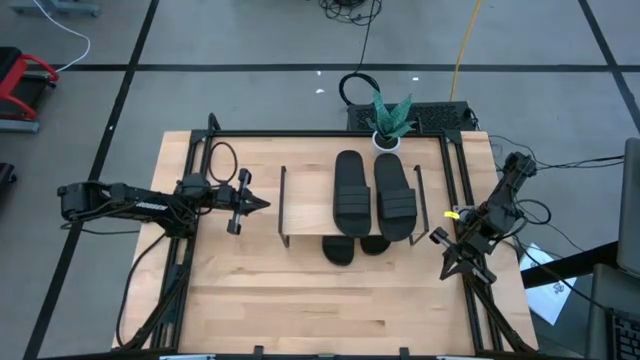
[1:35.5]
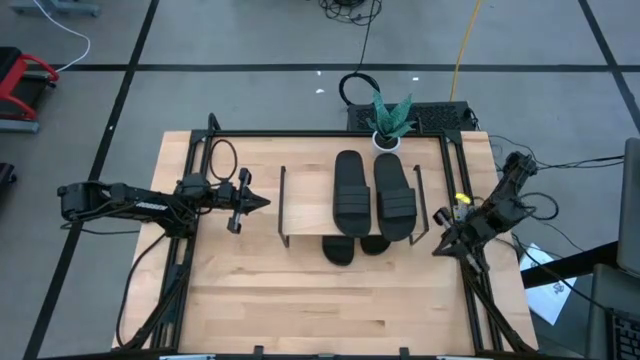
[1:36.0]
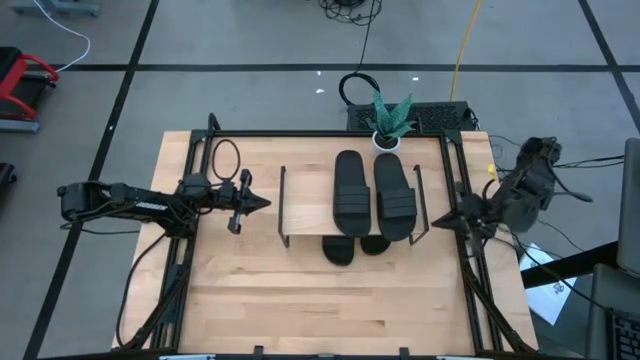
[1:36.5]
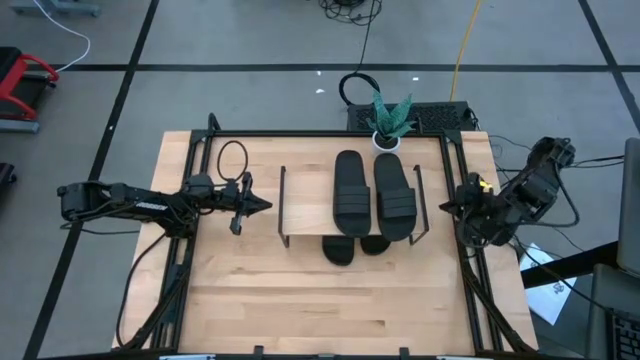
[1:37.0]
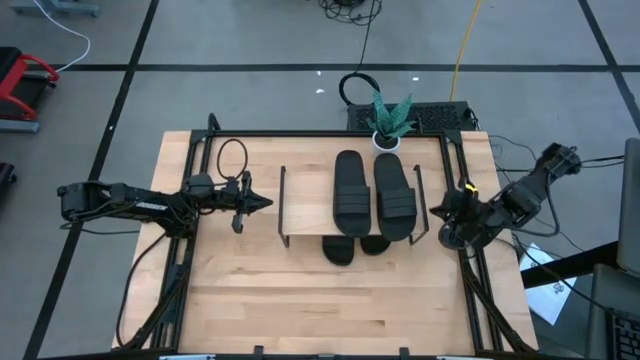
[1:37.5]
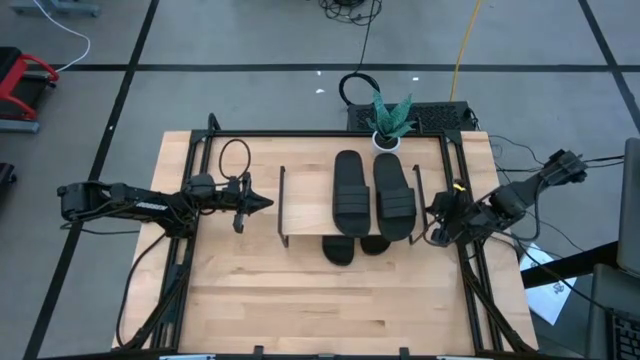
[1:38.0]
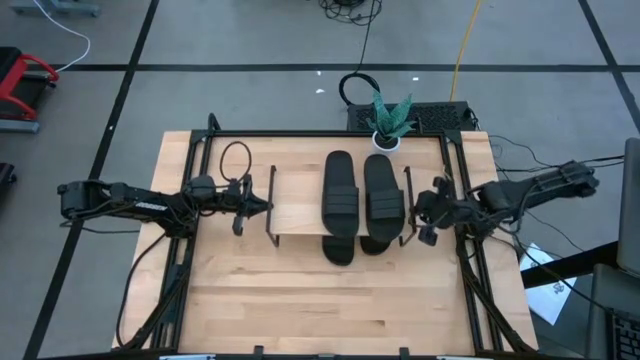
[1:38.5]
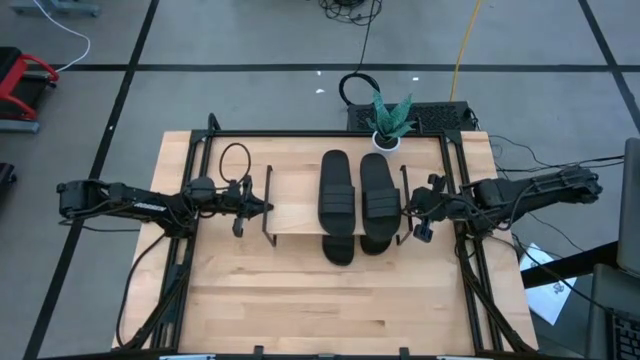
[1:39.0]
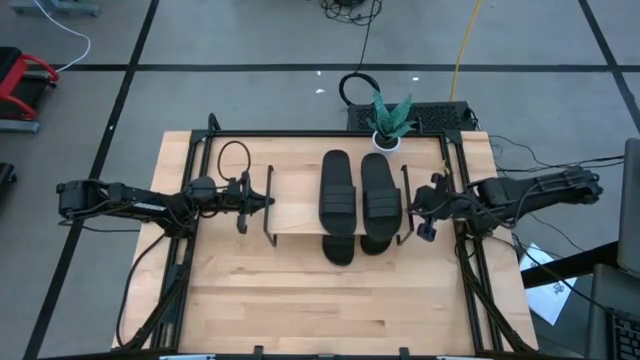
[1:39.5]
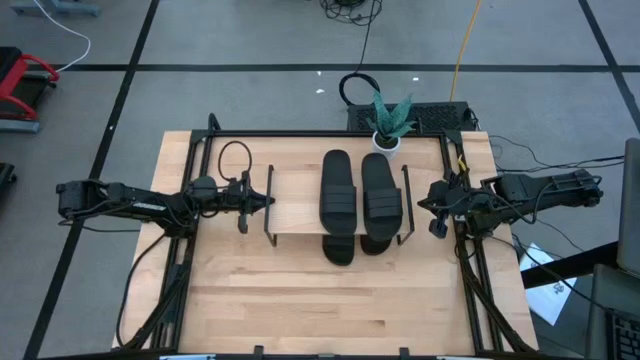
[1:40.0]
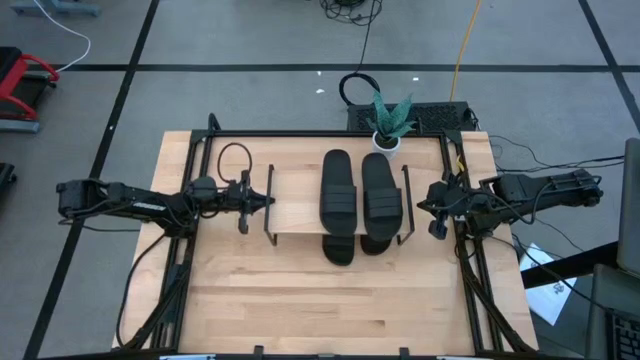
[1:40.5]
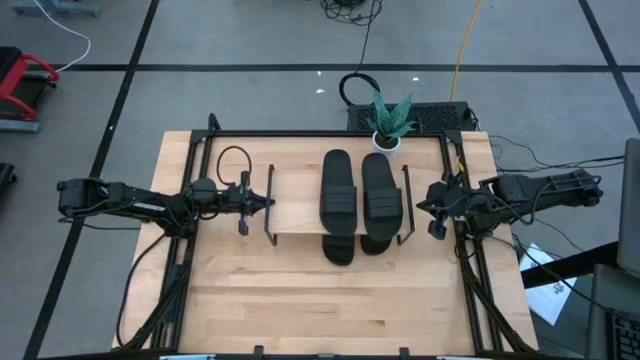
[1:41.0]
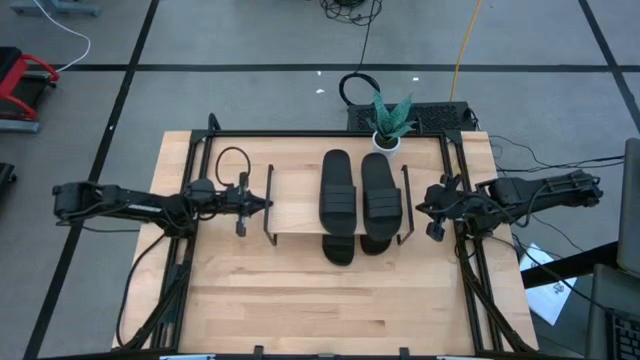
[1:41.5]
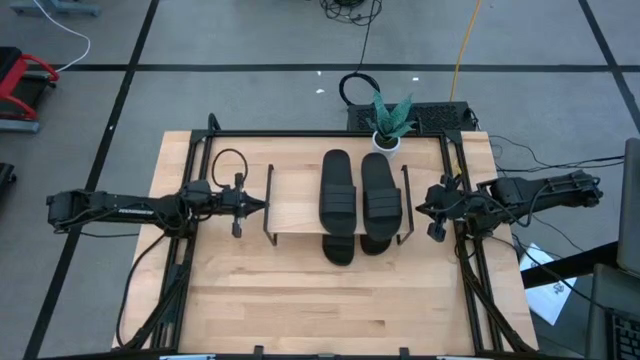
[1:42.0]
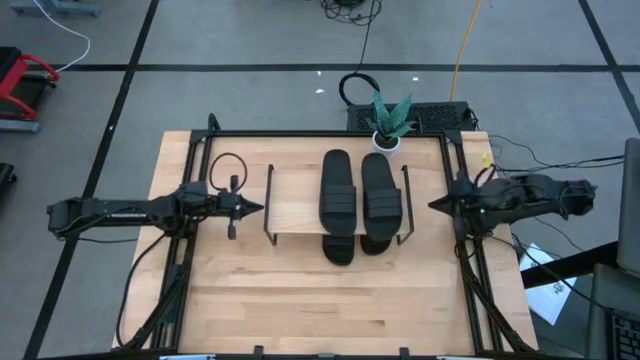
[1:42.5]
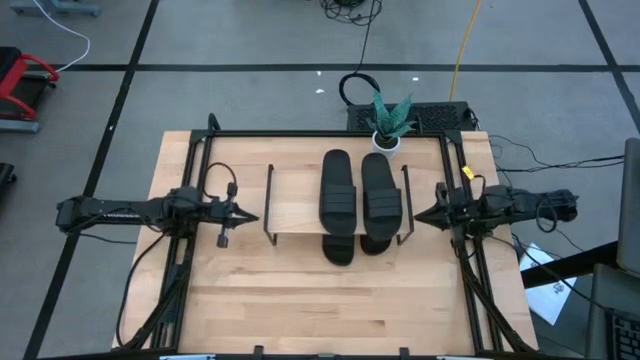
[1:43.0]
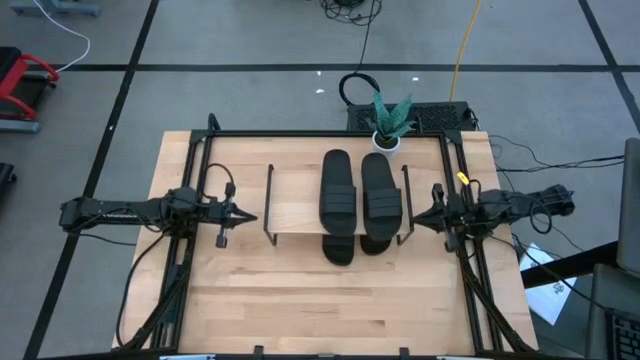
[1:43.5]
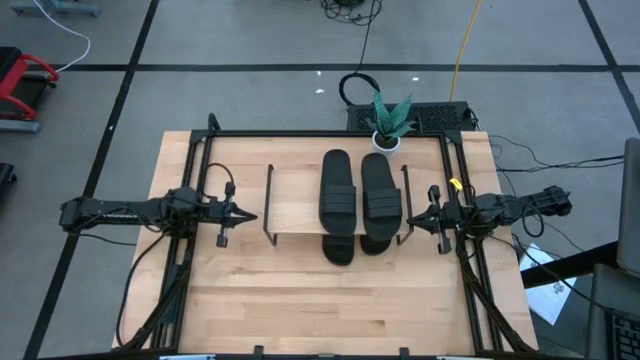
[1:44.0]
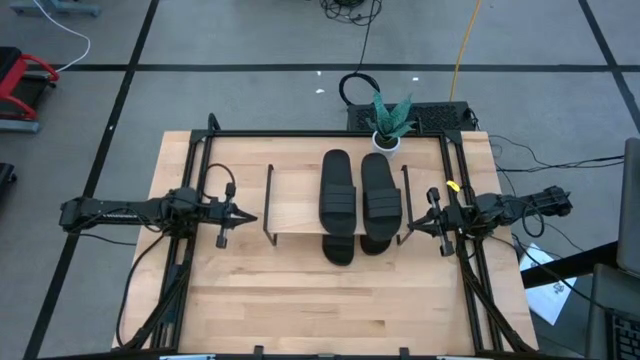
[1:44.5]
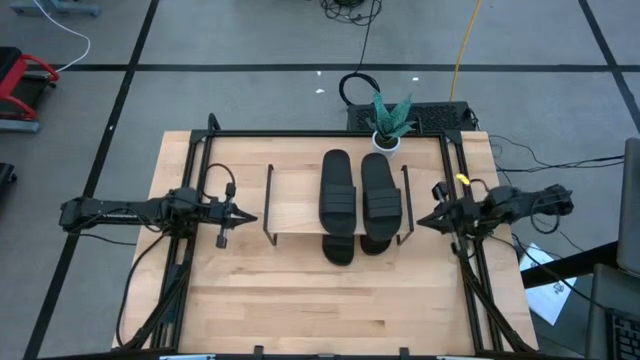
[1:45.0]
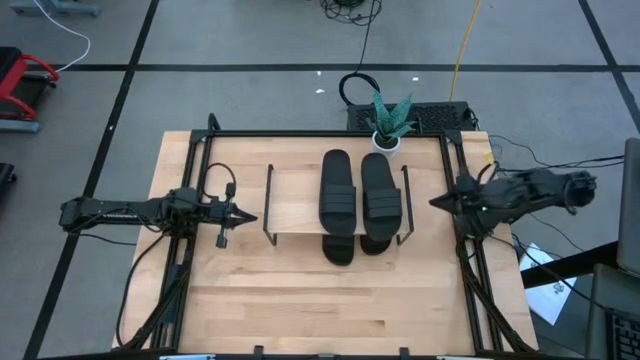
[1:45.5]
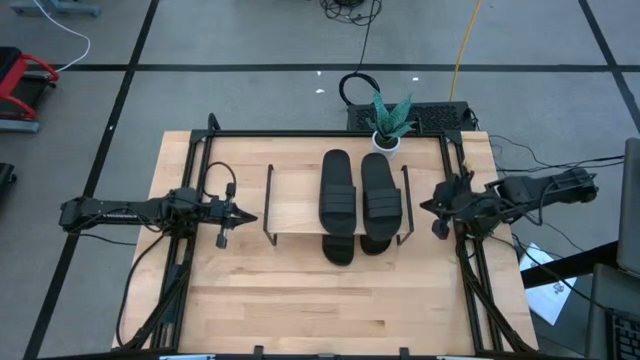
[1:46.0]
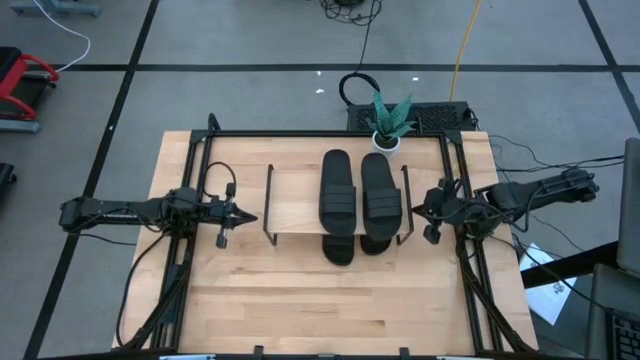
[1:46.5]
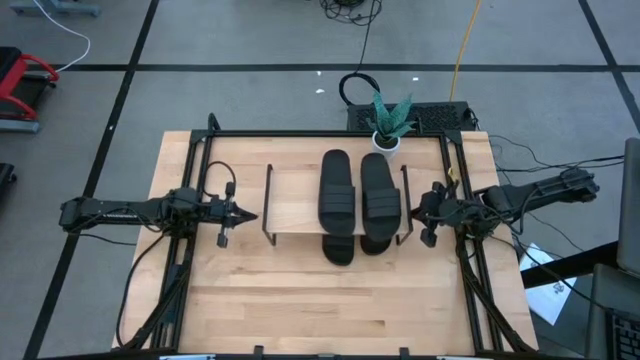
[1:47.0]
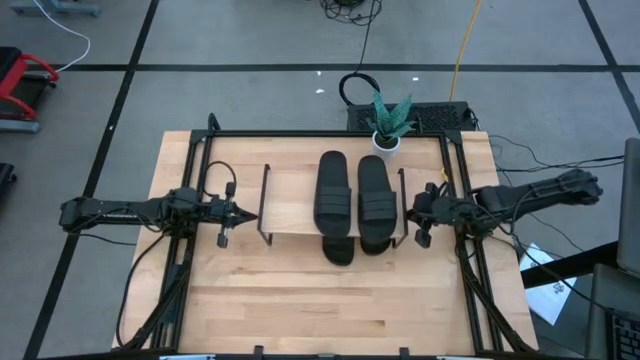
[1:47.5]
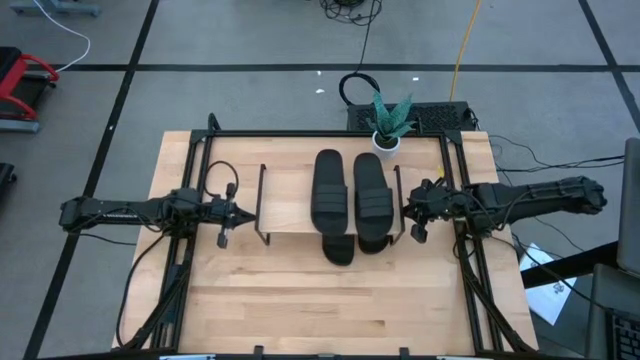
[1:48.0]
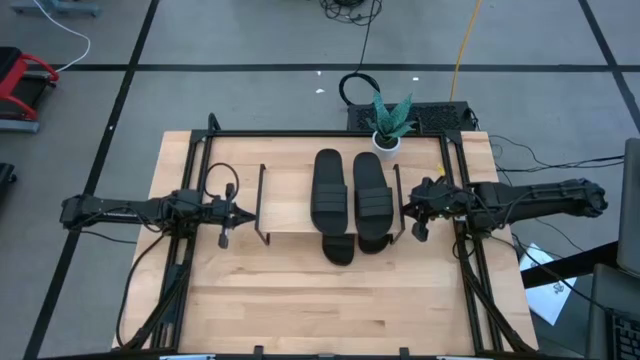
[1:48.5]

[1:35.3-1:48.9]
Task: Pick and place slides into the shelf
Adjust the shelf

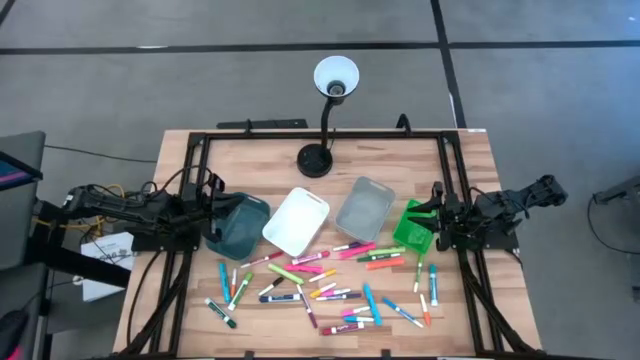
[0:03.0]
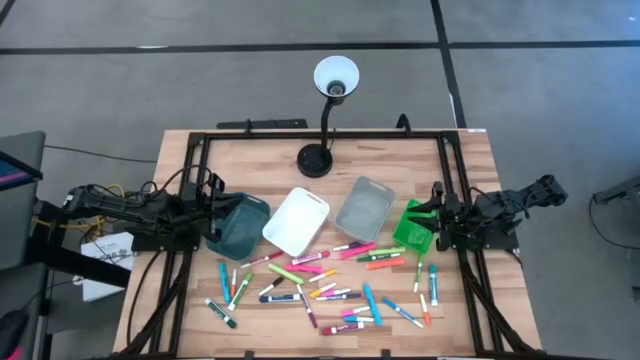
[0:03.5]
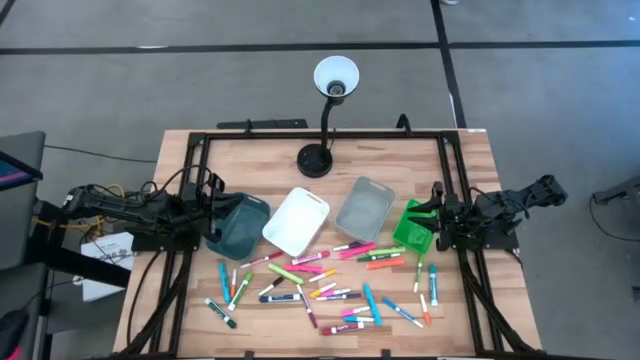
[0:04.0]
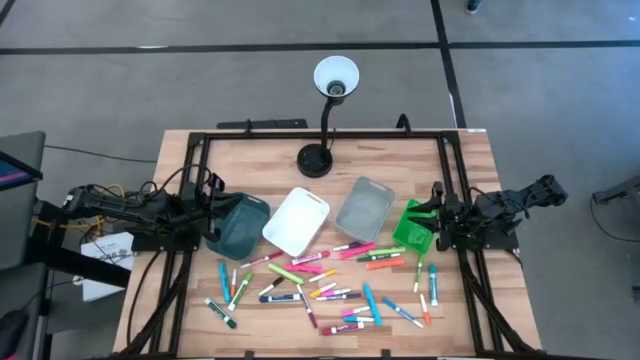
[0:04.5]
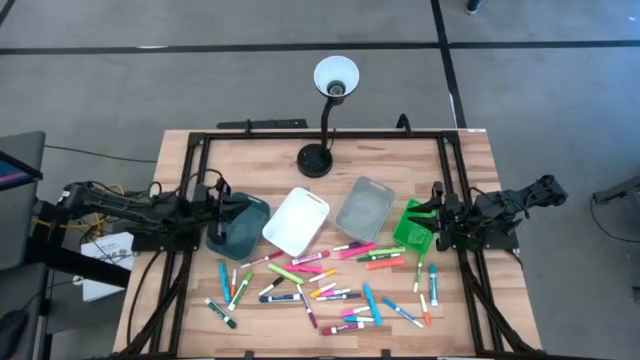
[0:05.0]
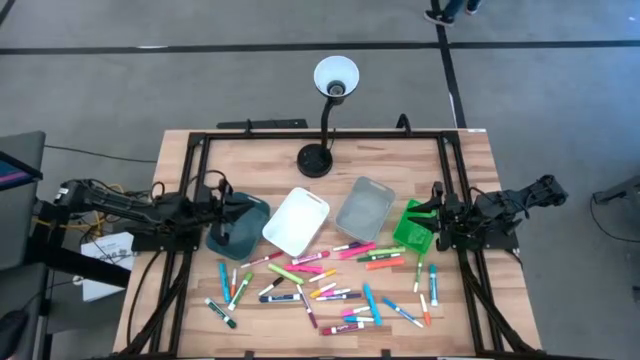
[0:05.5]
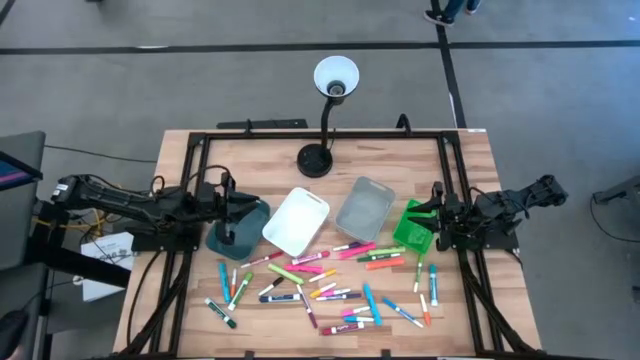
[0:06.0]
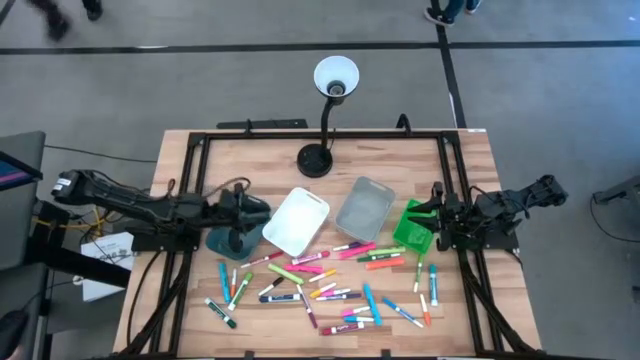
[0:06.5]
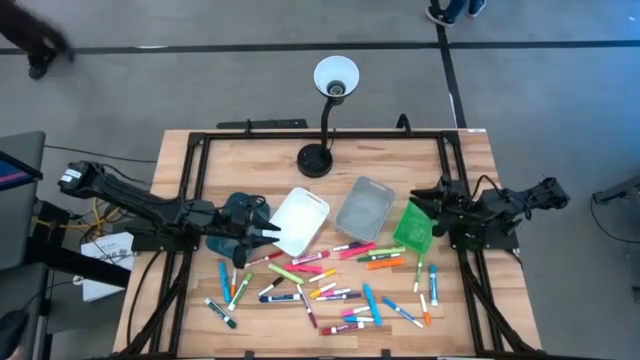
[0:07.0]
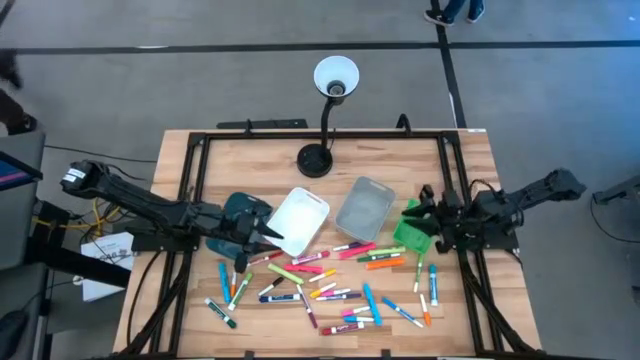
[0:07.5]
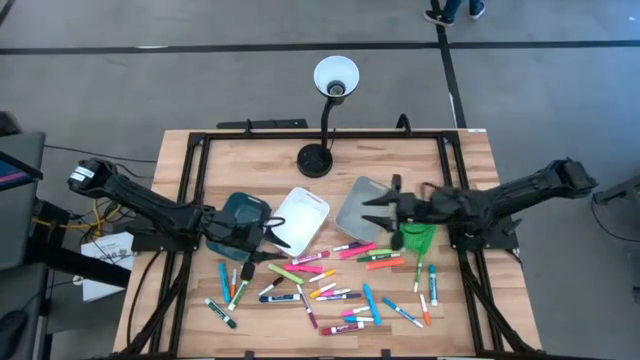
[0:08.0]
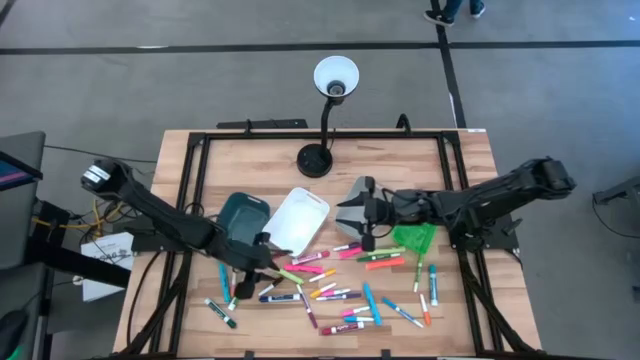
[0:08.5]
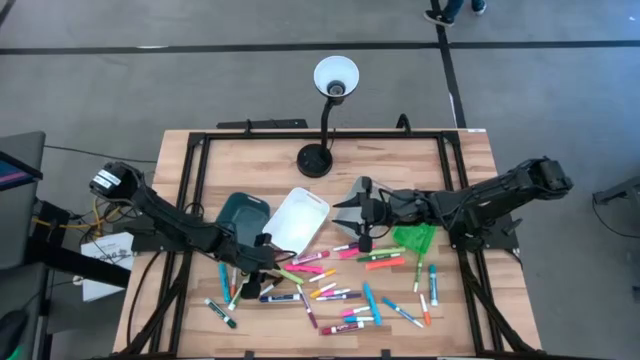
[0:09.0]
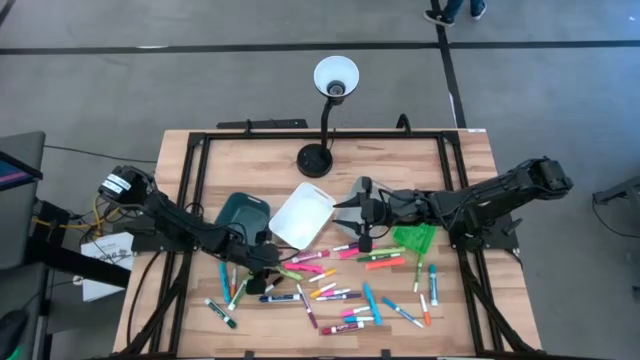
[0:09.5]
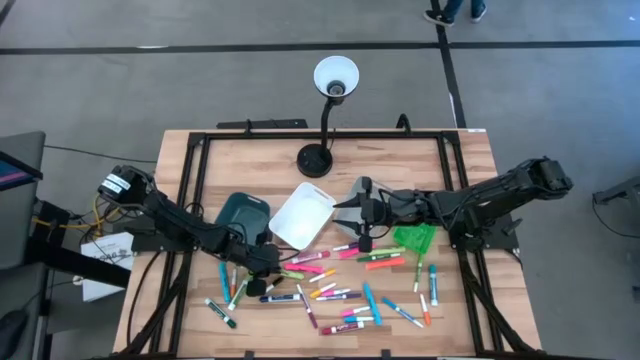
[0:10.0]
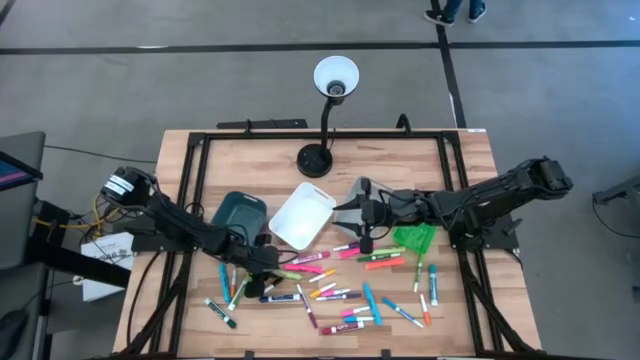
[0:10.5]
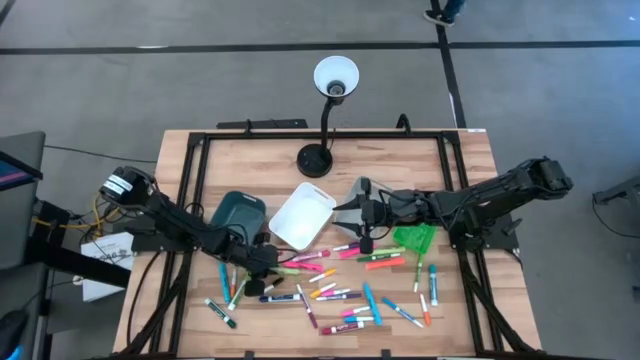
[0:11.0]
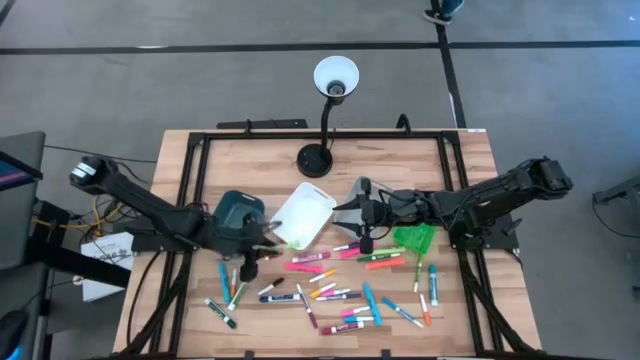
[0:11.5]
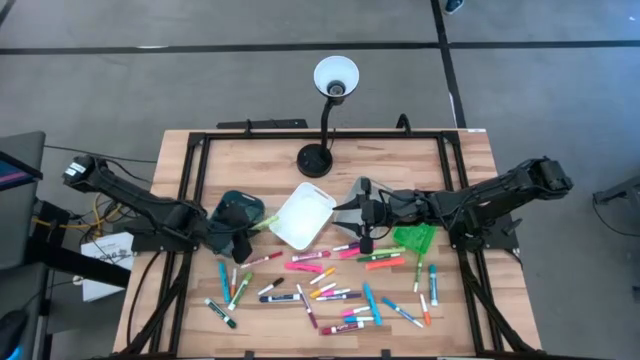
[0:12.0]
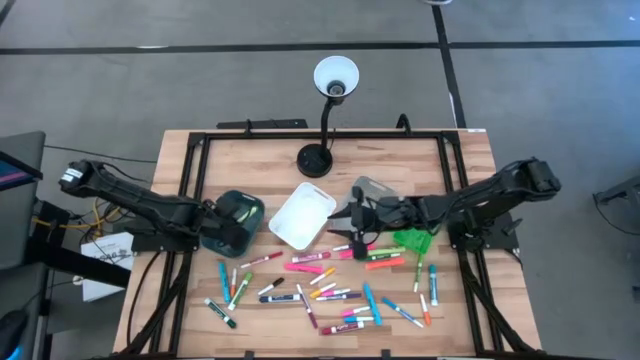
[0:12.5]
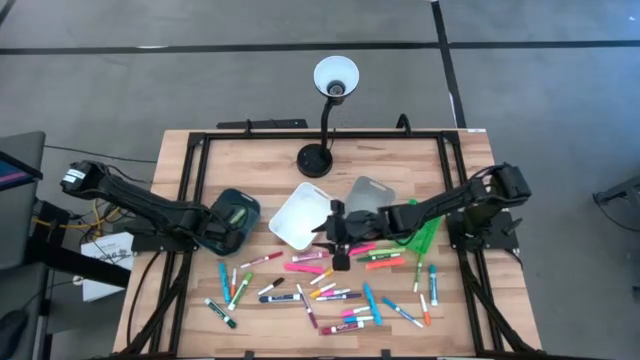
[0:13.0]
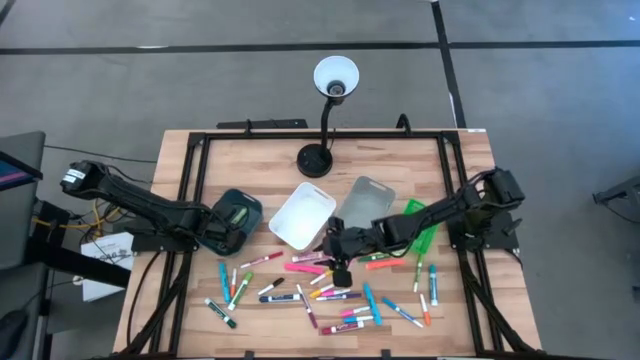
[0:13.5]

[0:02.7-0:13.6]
Task: Pick & Place Markers
Put the left light green highlighter into the blue bin
